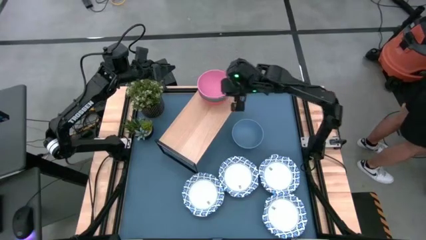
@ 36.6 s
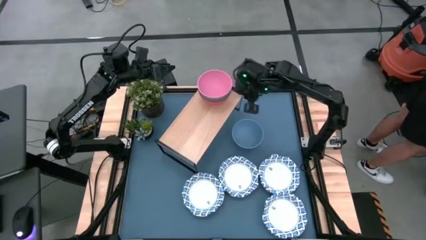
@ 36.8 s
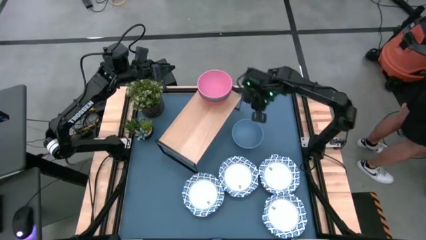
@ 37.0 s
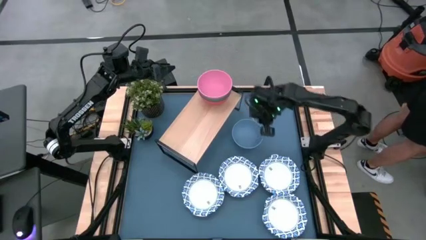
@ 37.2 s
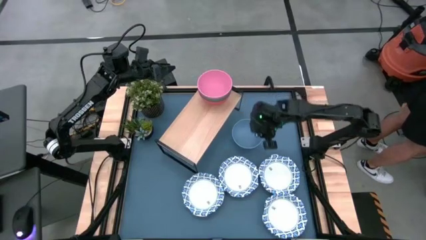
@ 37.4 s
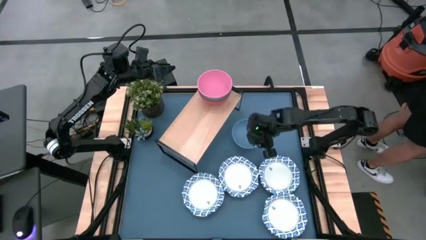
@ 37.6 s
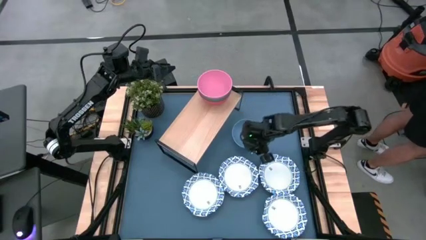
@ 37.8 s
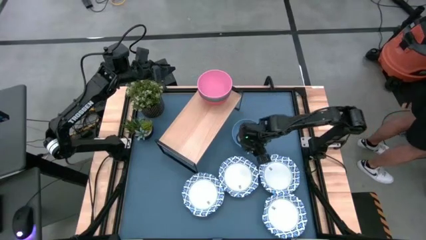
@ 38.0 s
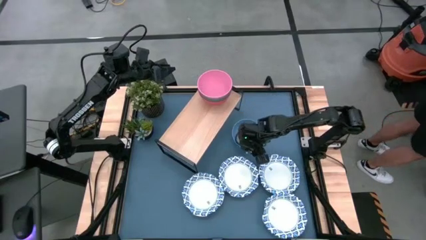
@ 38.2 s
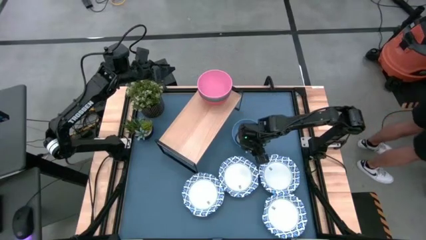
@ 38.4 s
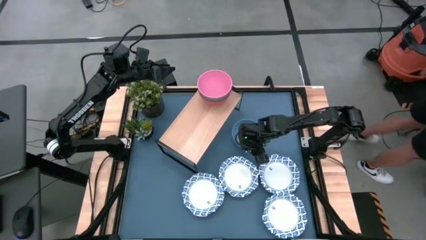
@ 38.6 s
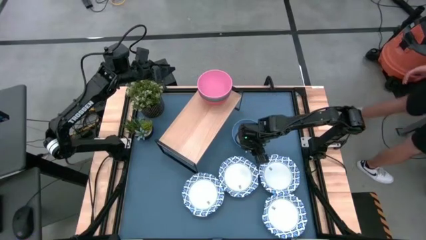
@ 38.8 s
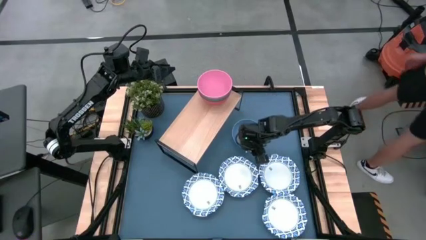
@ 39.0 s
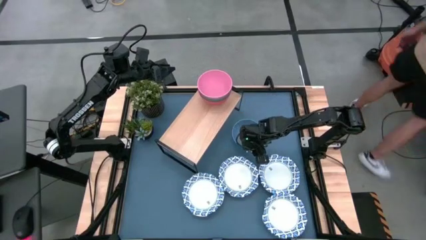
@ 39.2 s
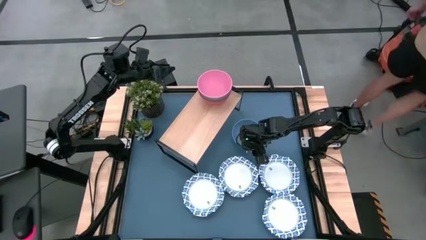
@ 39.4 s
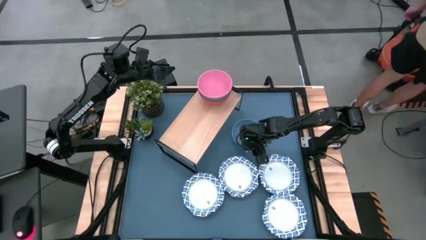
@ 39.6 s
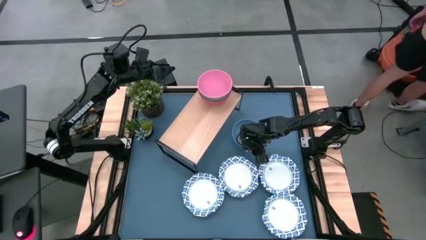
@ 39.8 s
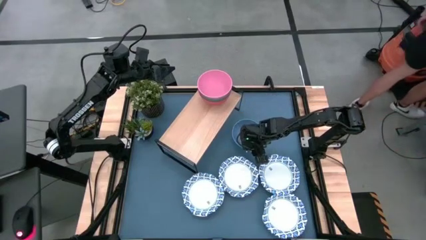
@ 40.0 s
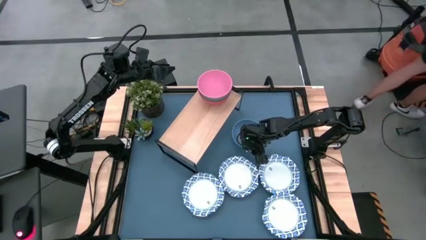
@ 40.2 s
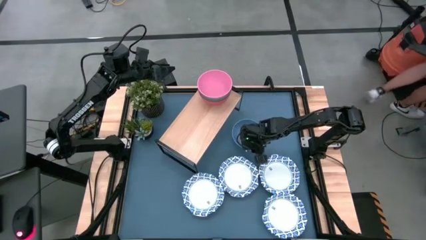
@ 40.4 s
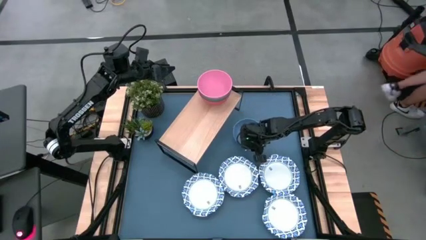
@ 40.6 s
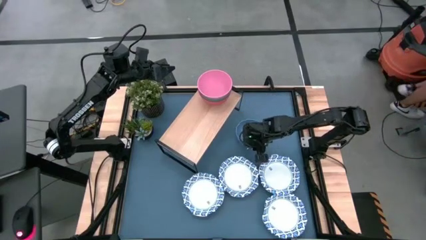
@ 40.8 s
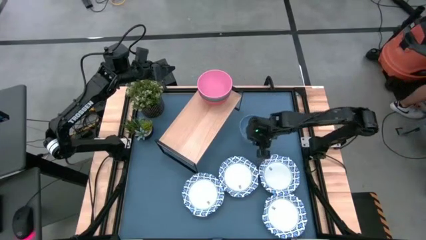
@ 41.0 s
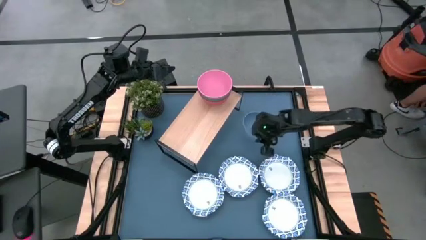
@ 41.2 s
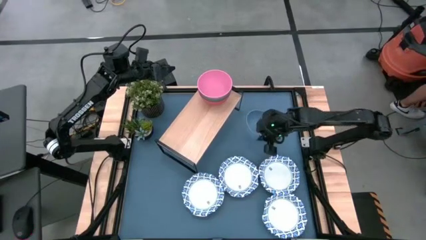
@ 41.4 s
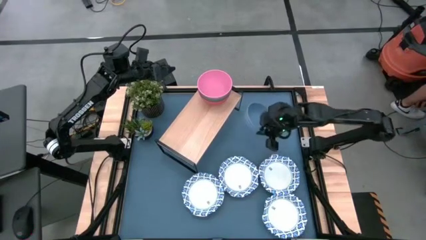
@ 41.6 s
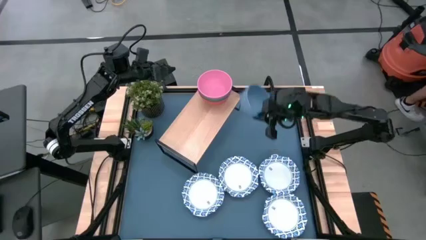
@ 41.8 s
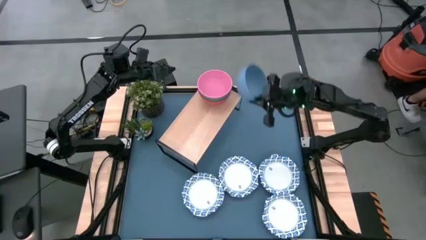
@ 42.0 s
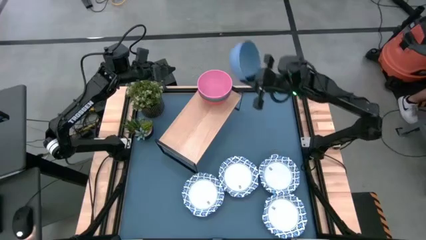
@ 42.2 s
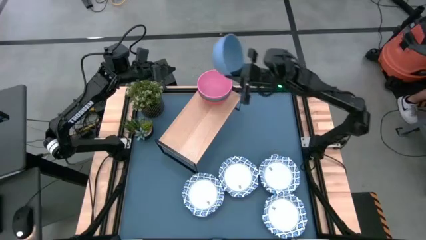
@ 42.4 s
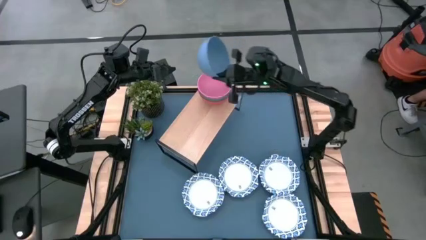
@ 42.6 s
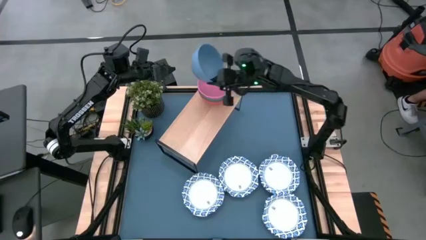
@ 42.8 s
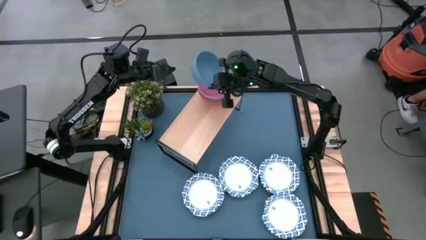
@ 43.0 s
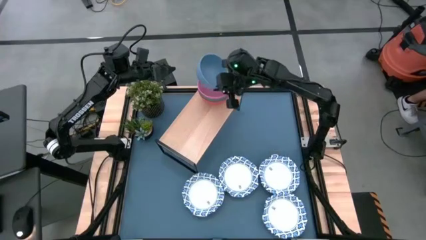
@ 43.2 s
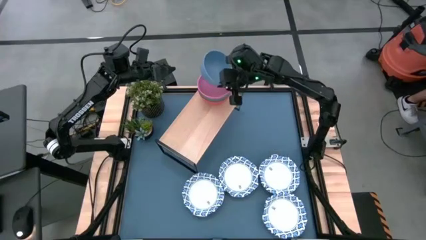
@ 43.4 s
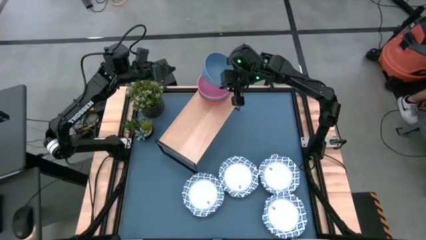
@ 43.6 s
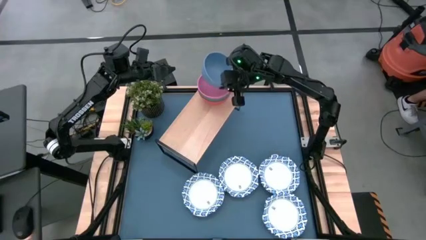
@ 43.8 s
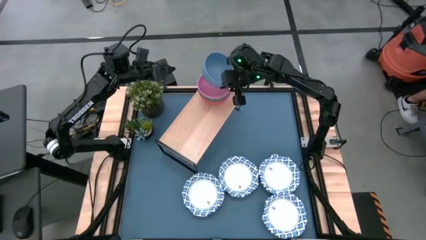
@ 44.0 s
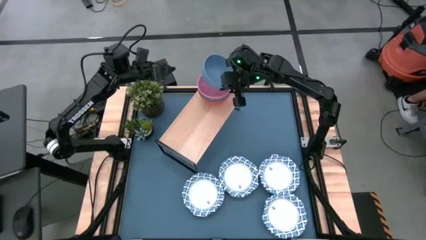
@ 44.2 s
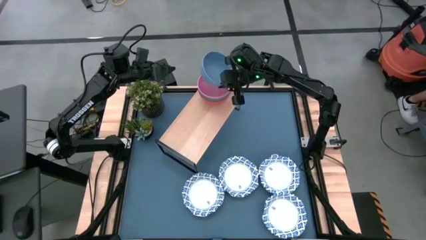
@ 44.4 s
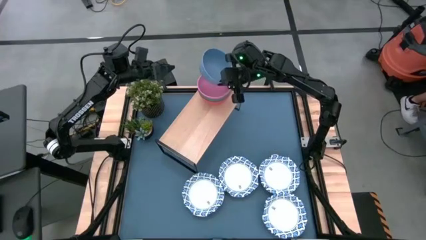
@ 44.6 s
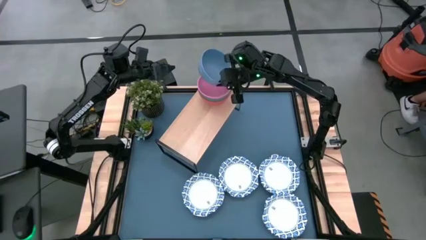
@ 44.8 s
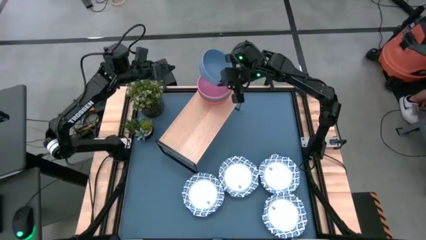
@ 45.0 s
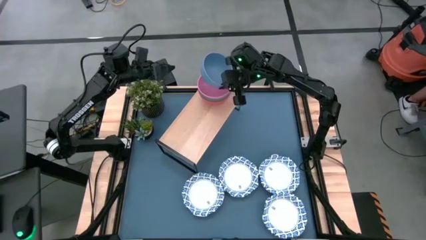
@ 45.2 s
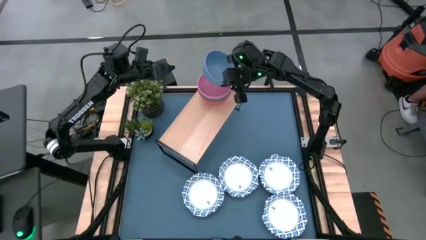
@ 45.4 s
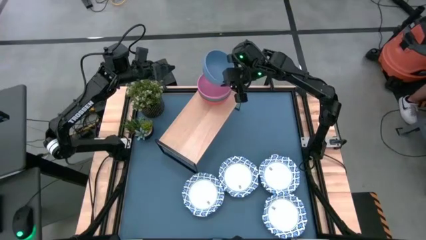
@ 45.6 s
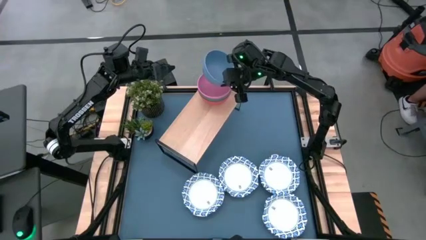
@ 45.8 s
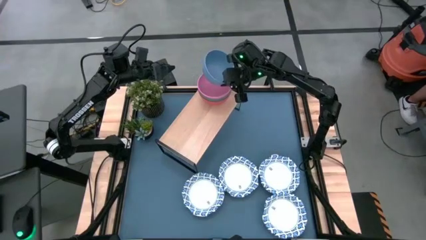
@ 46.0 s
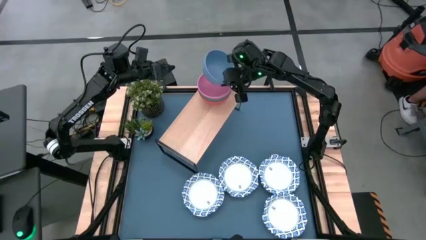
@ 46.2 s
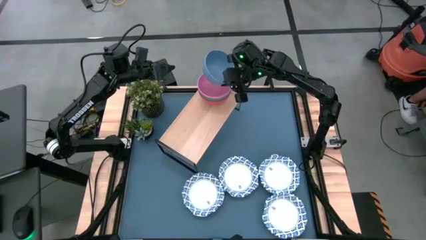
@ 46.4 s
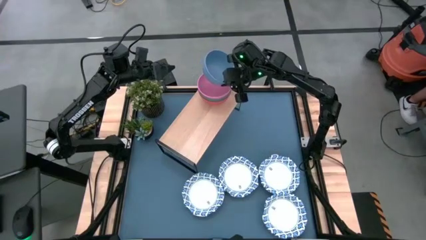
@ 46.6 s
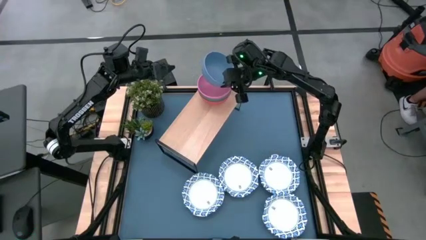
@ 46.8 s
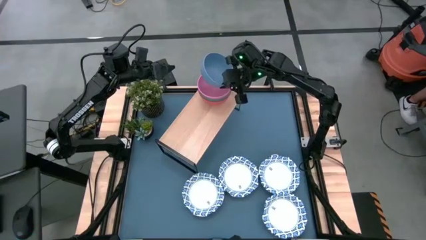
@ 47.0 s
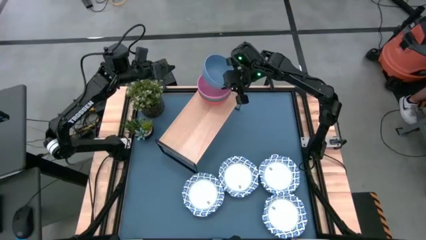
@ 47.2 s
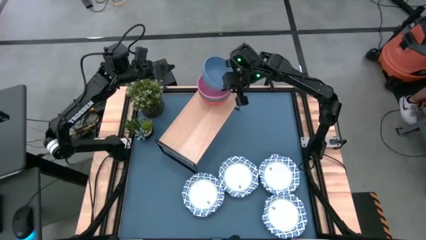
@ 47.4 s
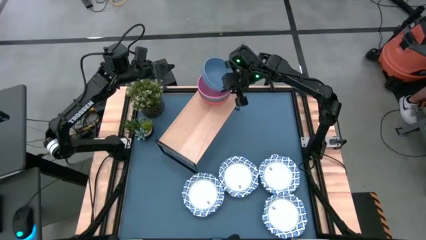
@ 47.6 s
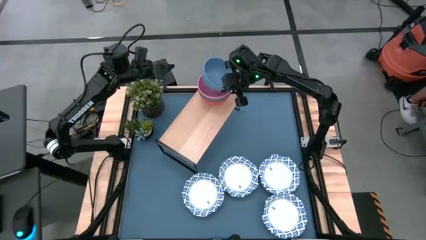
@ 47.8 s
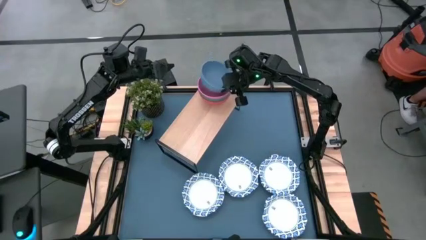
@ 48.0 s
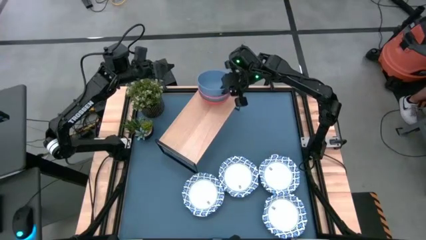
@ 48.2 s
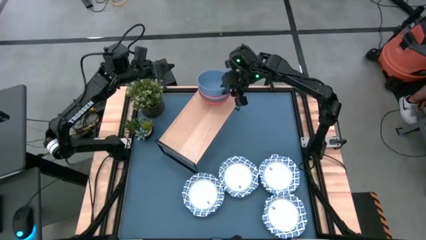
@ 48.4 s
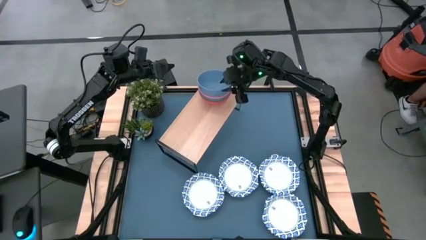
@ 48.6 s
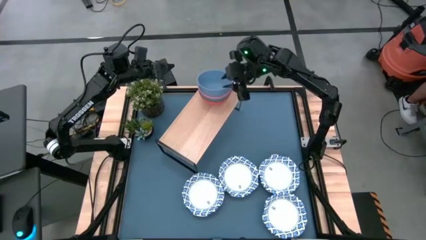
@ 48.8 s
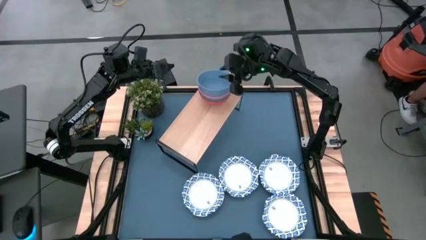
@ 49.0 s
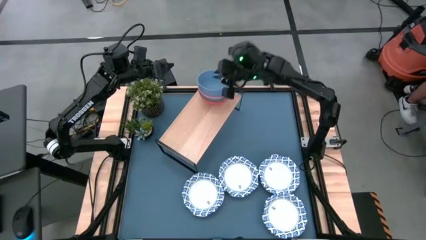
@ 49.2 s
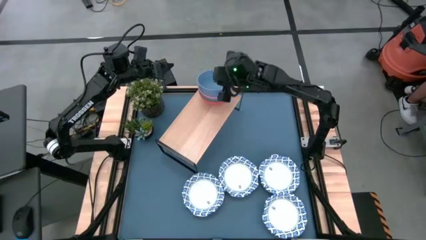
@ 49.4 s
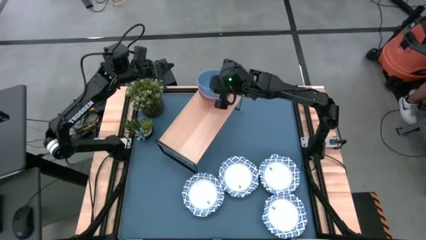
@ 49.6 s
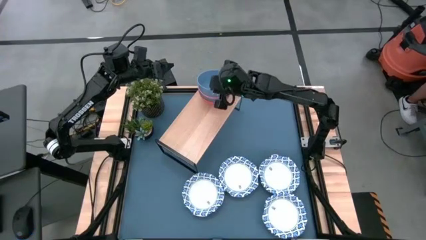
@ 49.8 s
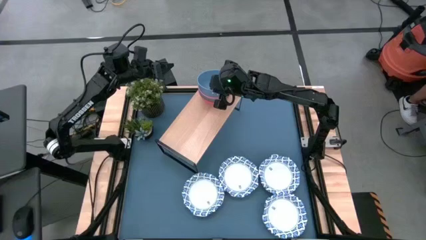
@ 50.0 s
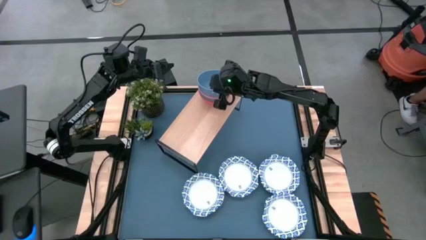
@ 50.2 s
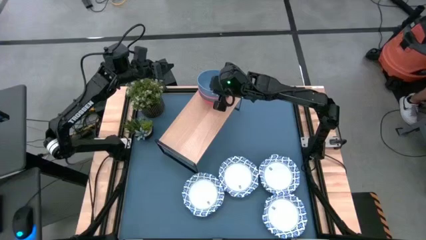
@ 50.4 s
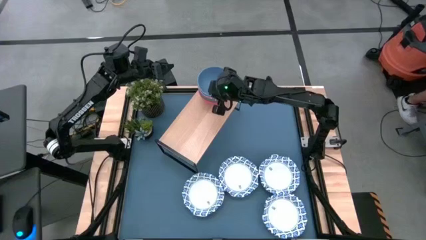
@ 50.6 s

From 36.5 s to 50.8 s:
Task: Place and stack bowls onto a shelf
Stack the blue bowl on top of the pink bowl on the shelf
